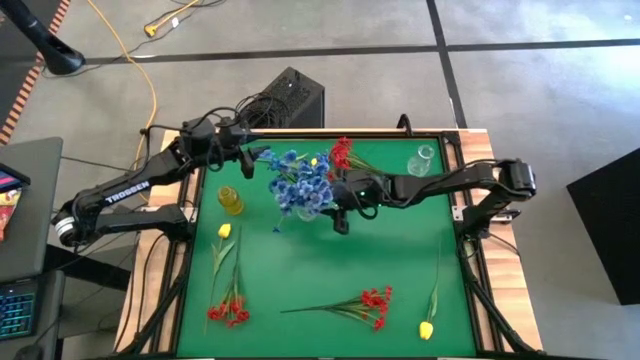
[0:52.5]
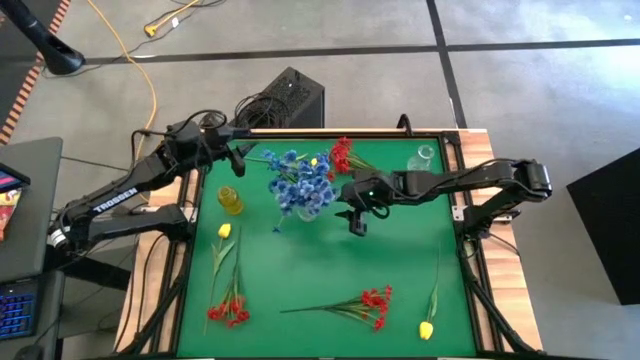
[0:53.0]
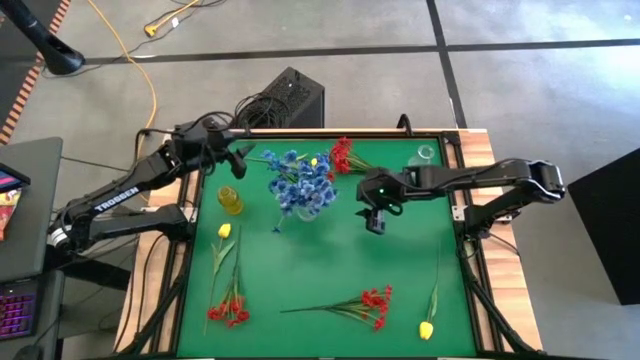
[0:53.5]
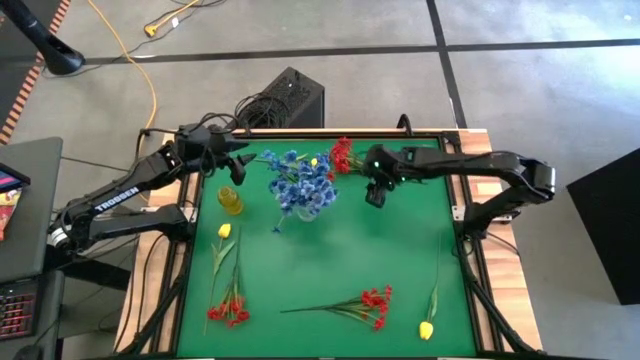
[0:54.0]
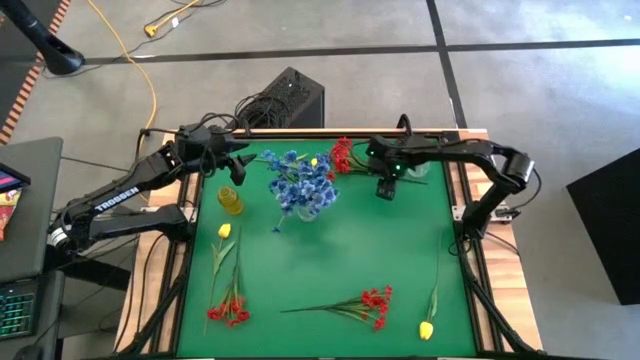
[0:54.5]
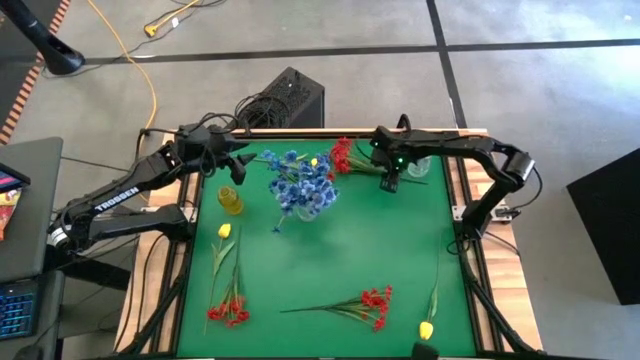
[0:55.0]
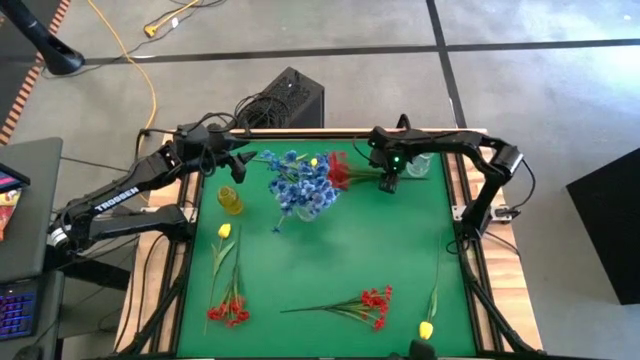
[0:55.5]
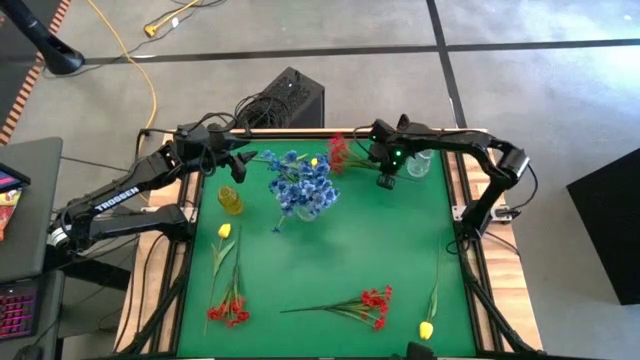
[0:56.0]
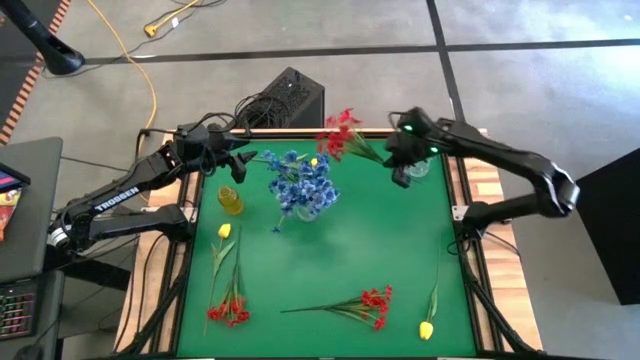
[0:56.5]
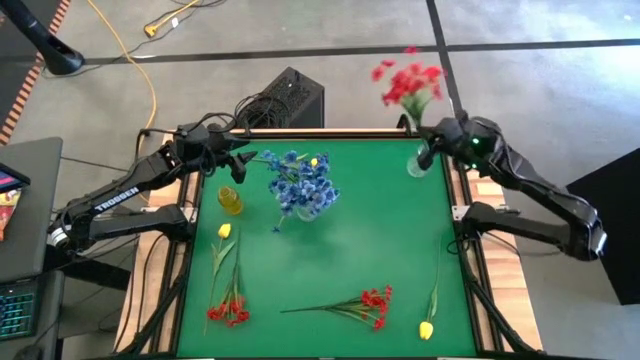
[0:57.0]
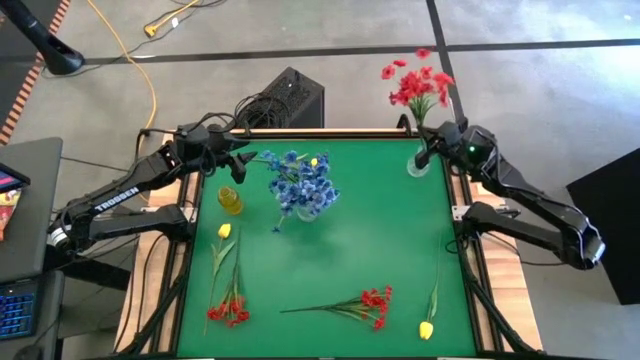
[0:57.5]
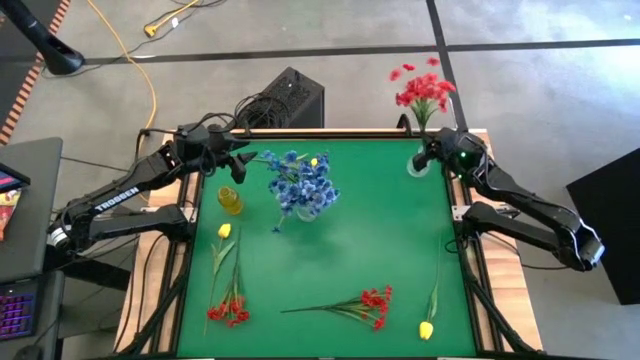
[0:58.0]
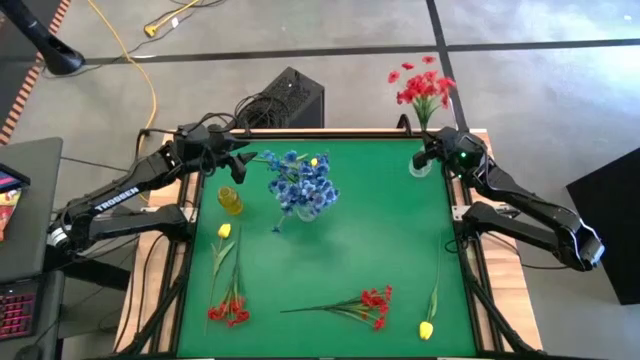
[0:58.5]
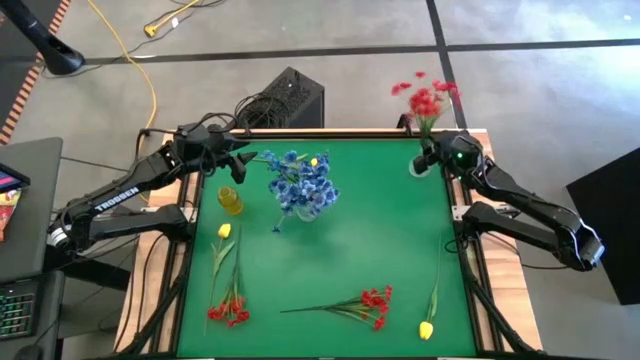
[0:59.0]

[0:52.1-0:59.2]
Task: Sort flowers into vase by color
Put the top right red flowers into the top transparent vase

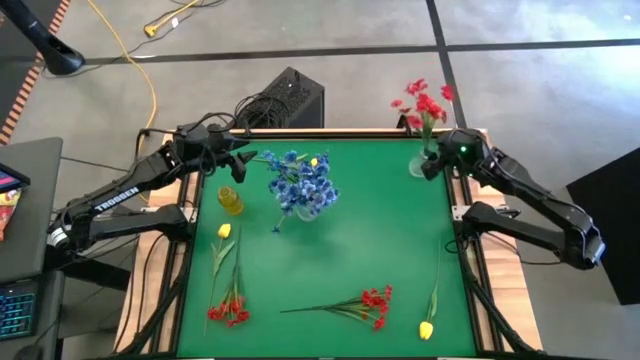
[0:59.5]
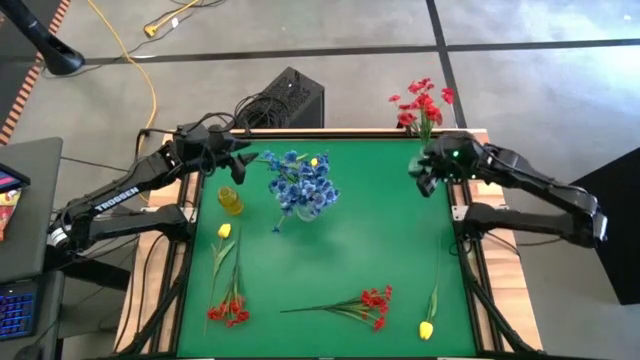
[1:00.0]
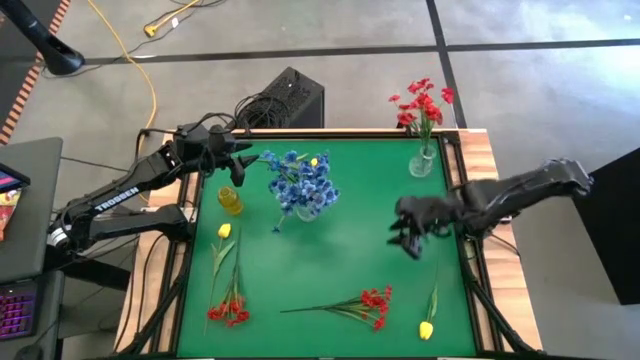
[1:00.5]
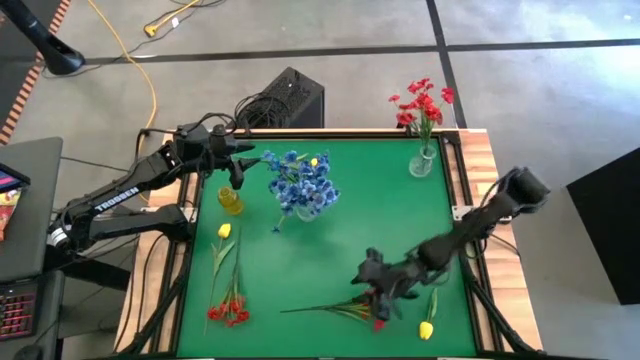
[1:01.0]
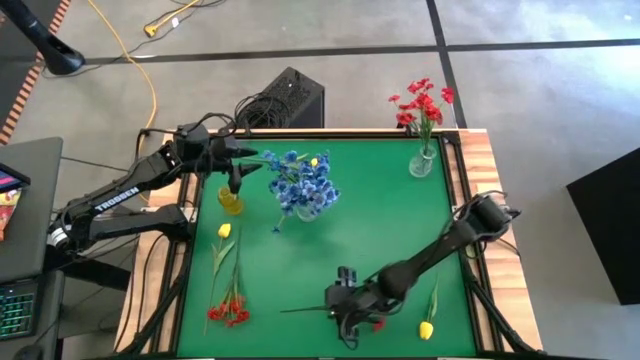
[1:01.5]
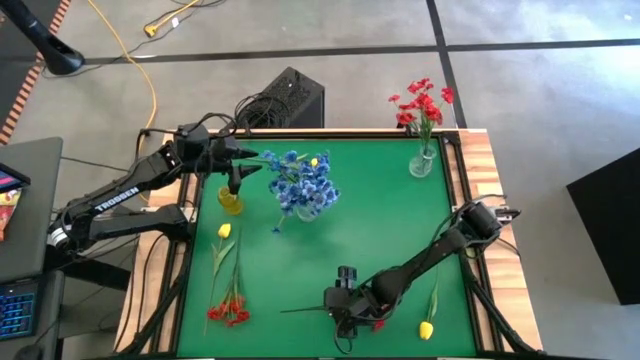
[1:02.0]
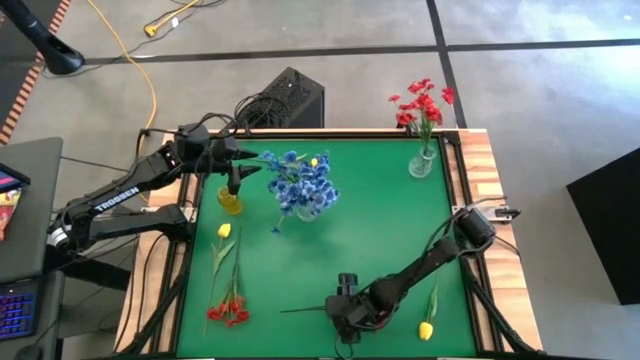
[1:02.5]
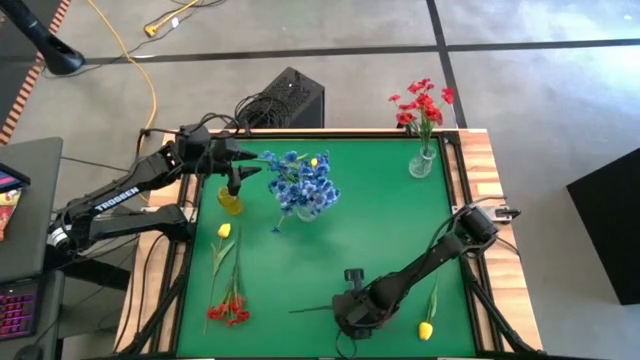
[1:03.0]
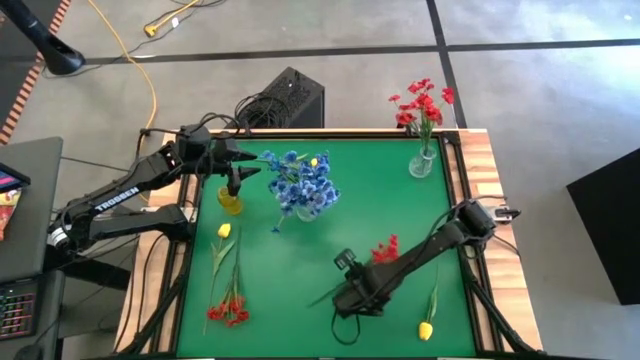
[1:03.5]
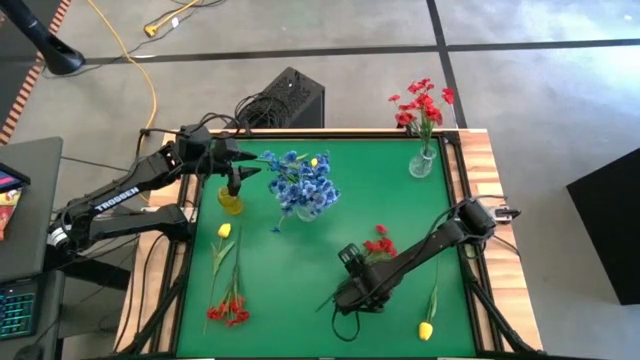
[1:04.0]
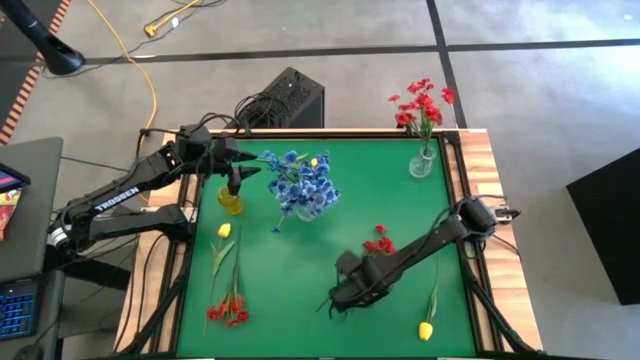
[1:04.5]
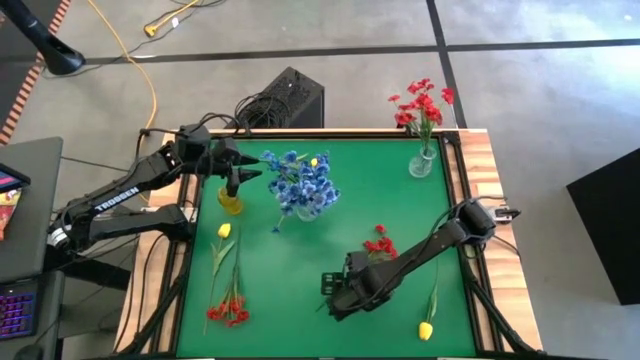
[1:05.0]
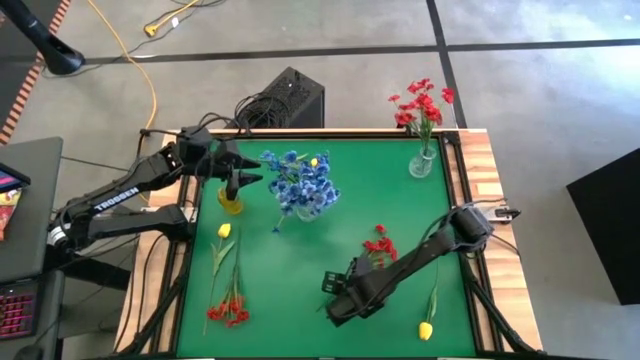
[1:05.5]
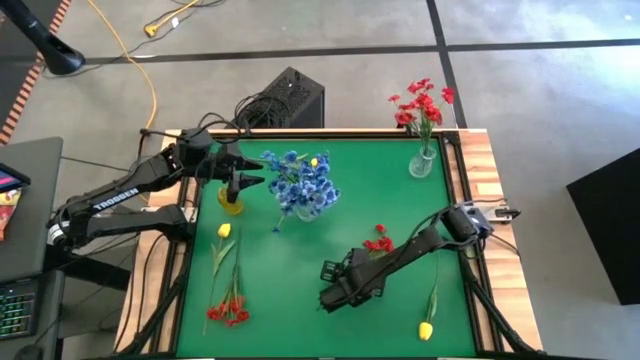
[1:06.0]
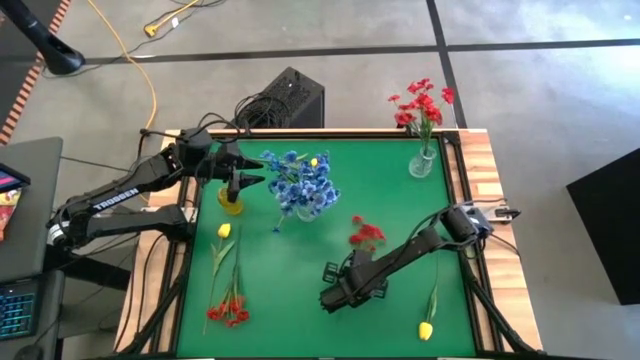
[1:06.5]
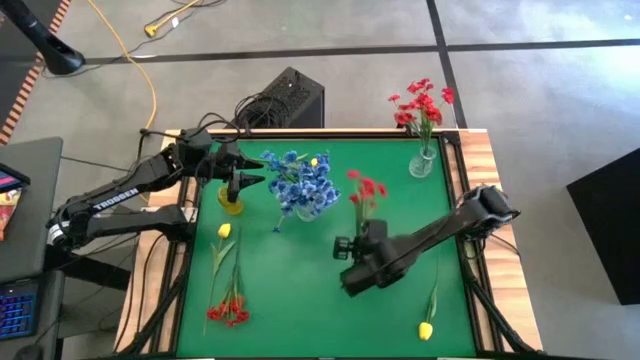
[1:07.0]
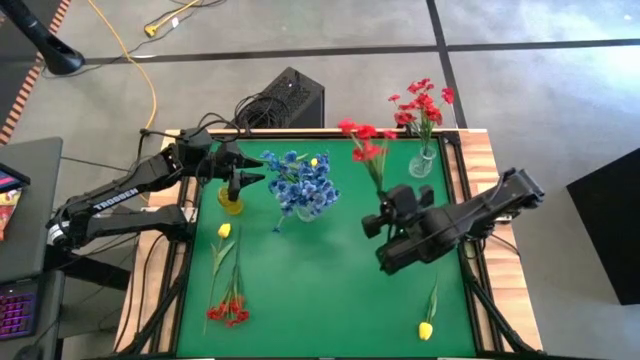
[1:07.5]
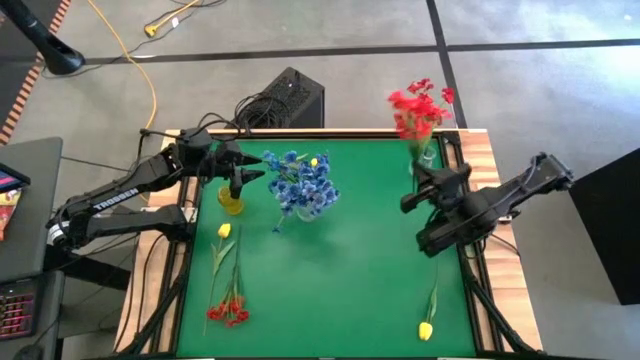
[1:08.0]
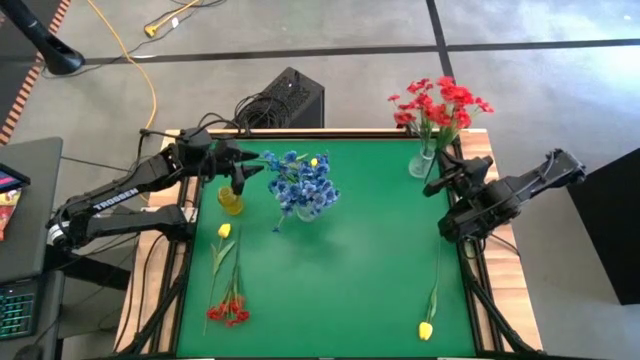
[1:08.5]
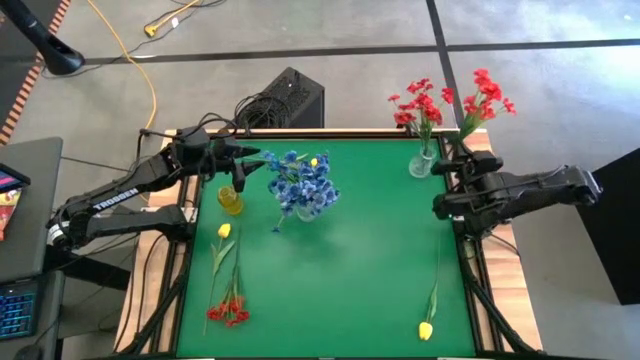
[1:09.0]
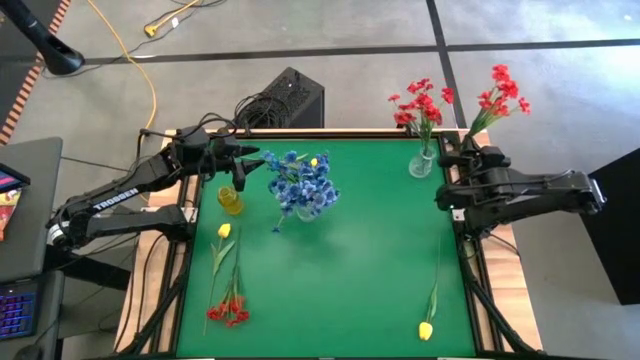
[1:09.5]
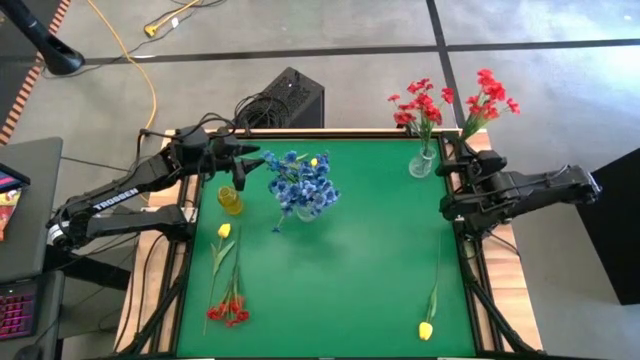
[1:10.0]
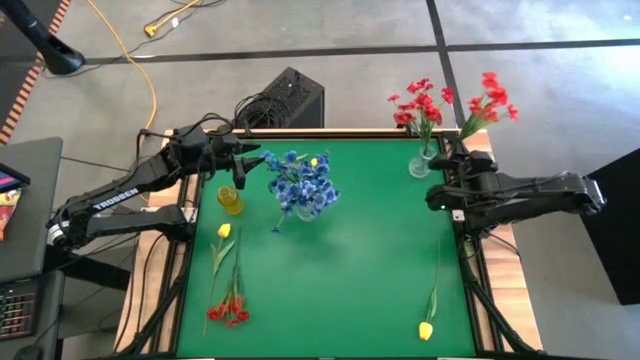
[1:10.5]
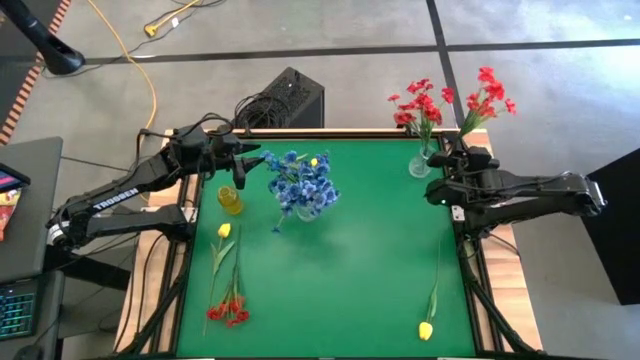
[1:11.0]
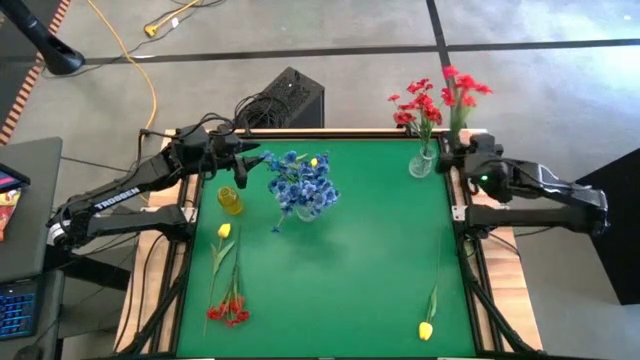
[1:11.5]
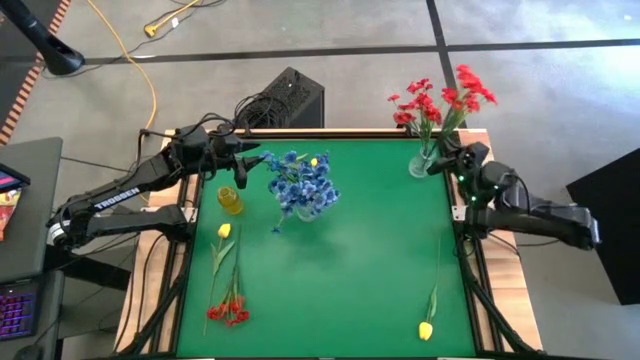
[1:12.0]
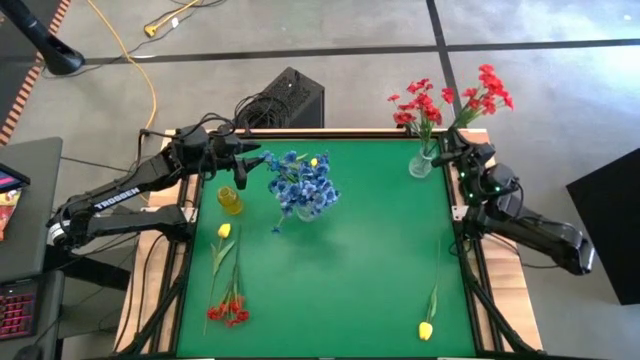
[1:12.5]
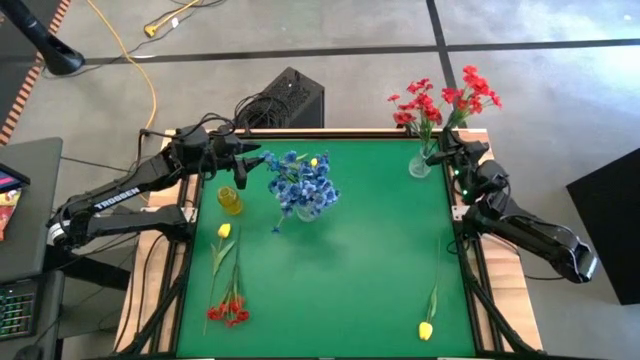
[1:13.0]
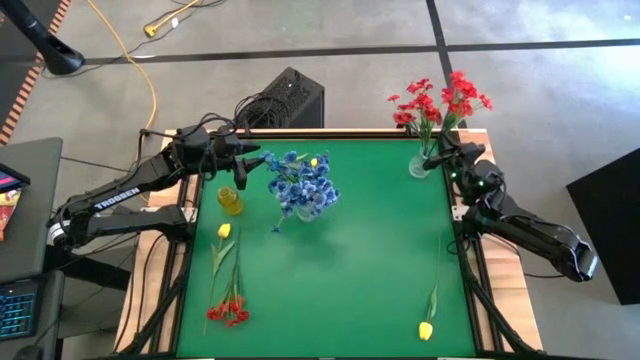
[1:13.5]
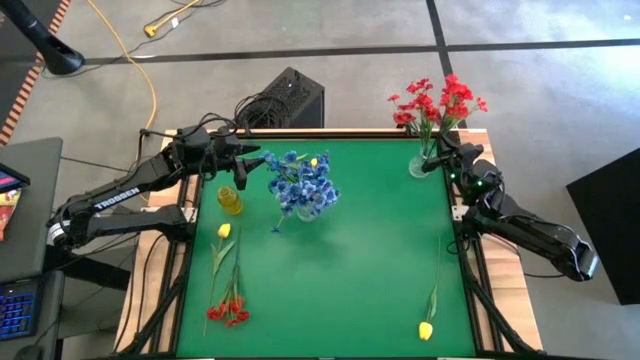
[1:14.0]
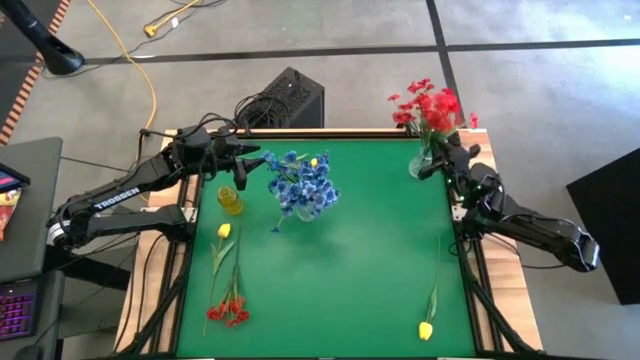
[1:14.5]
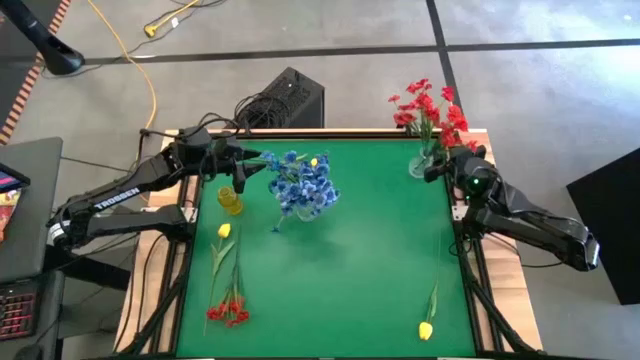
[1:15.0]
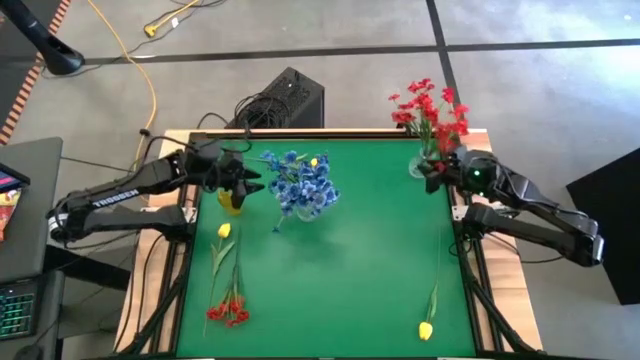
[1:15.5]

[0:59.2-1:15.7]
Put the right red flowers into the right transparent vase
